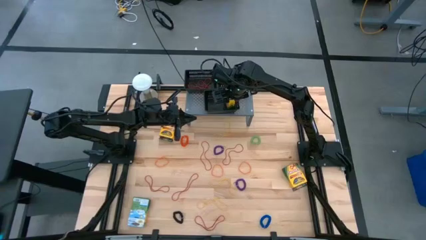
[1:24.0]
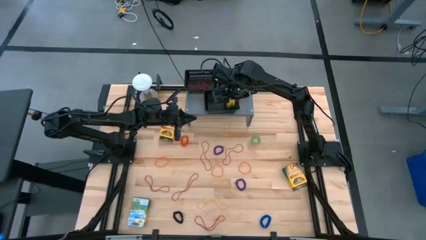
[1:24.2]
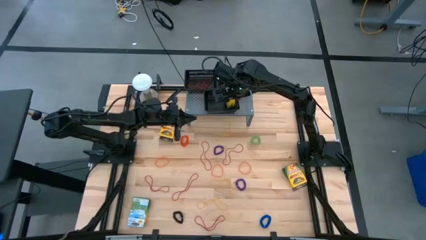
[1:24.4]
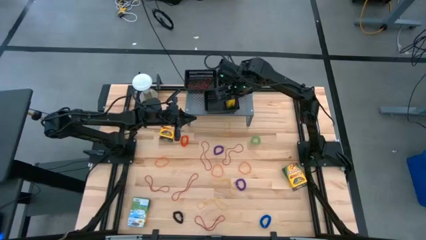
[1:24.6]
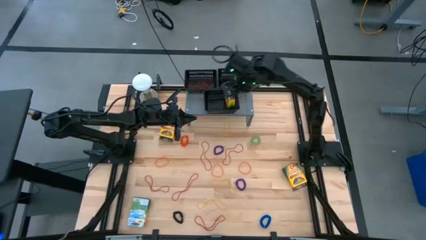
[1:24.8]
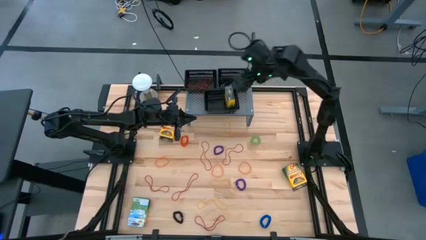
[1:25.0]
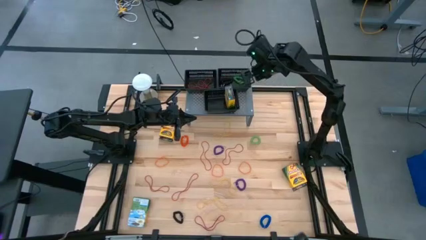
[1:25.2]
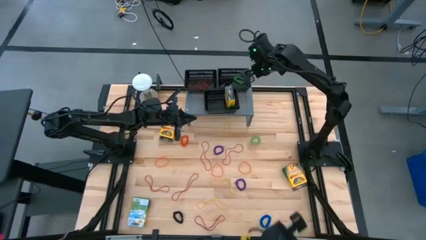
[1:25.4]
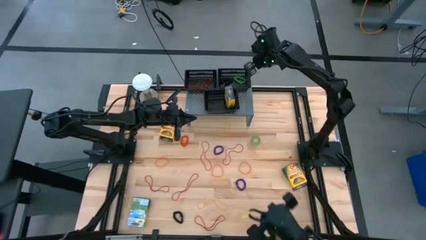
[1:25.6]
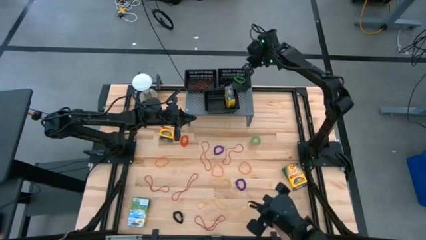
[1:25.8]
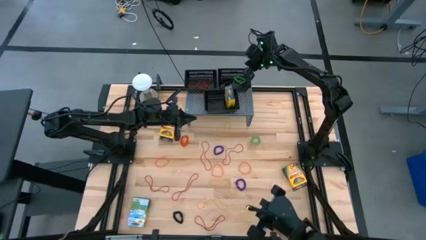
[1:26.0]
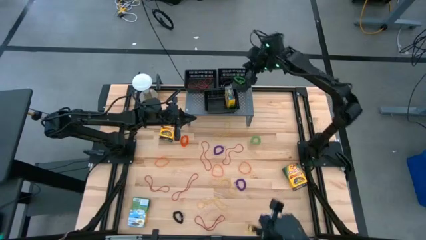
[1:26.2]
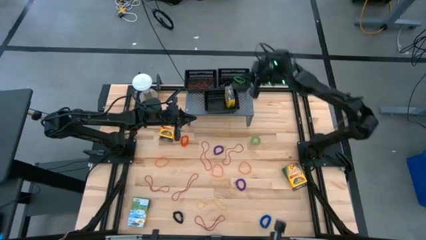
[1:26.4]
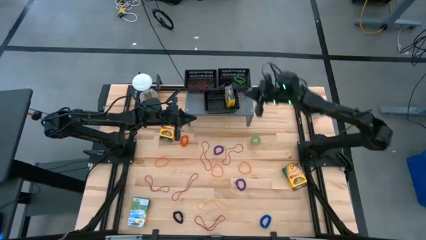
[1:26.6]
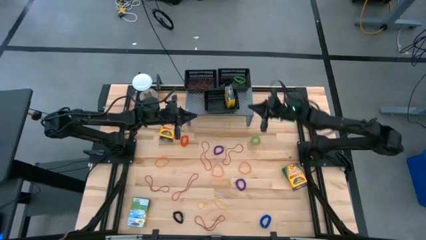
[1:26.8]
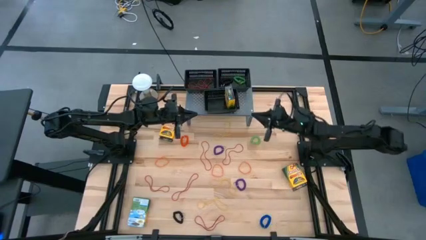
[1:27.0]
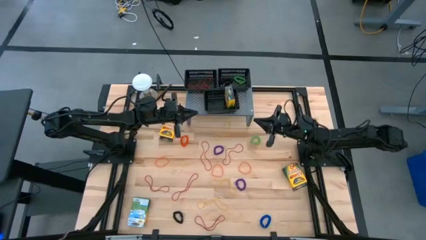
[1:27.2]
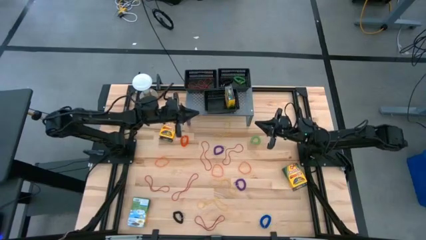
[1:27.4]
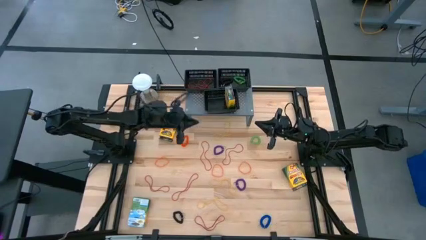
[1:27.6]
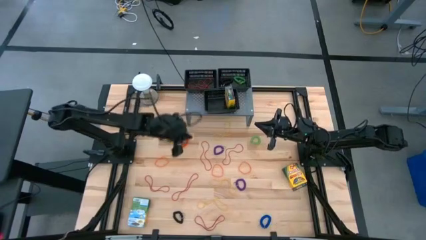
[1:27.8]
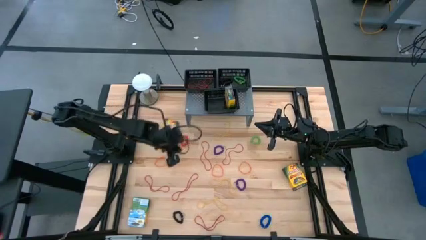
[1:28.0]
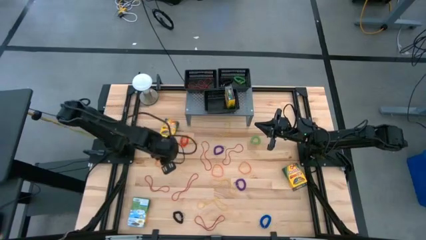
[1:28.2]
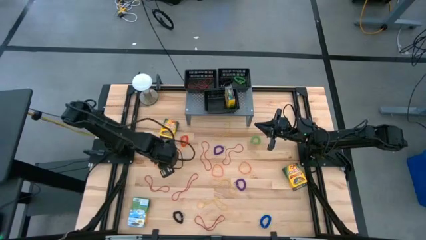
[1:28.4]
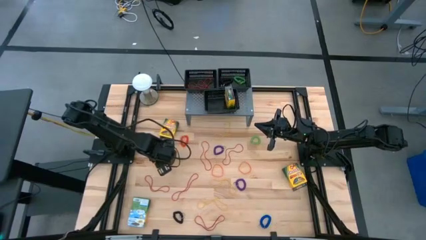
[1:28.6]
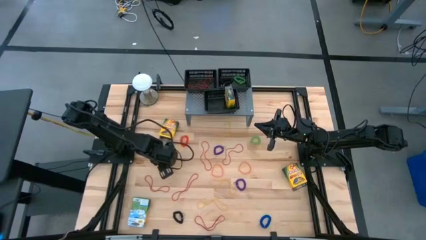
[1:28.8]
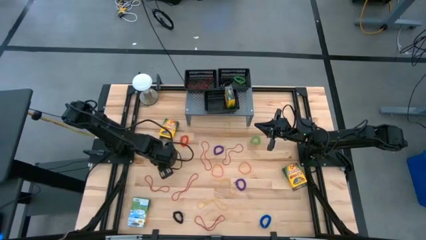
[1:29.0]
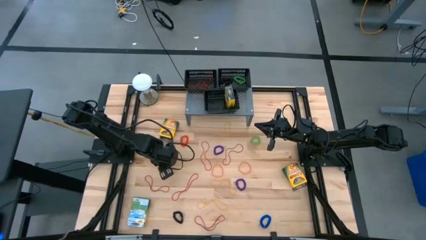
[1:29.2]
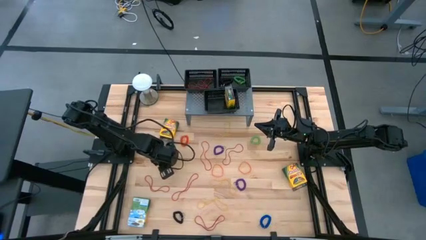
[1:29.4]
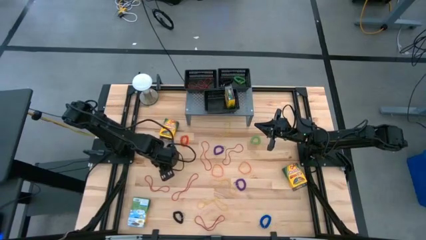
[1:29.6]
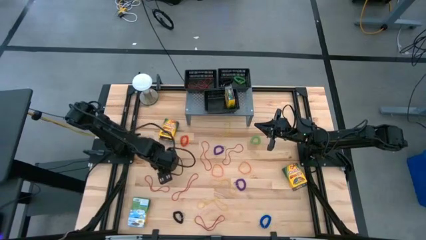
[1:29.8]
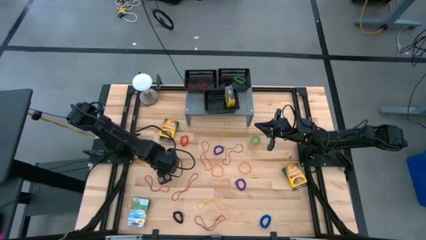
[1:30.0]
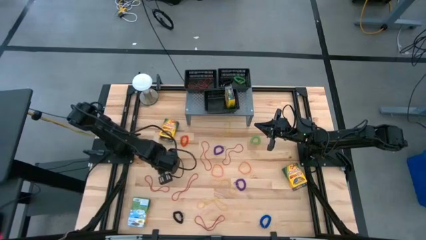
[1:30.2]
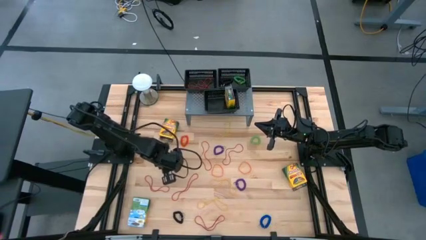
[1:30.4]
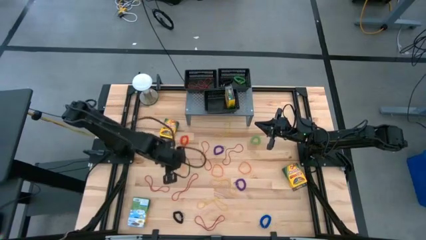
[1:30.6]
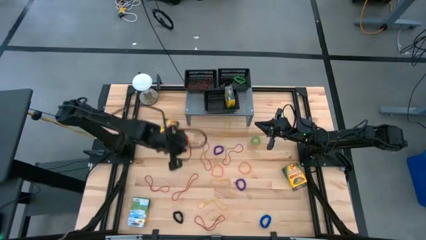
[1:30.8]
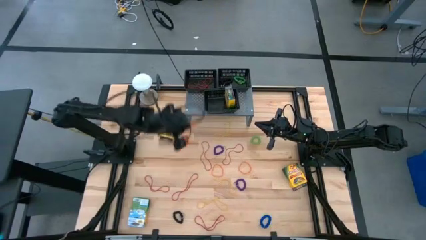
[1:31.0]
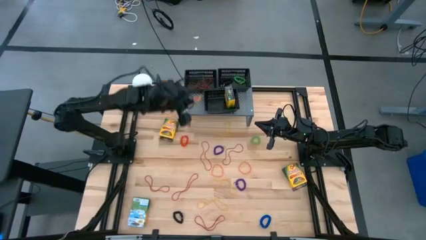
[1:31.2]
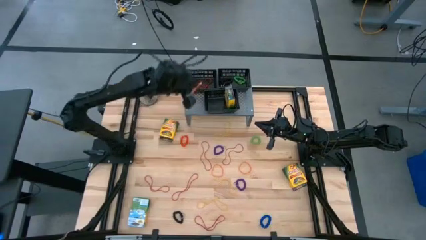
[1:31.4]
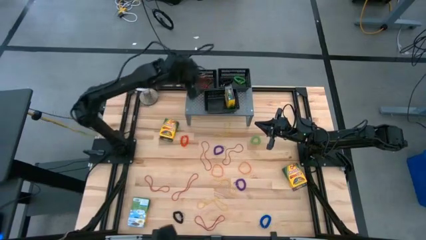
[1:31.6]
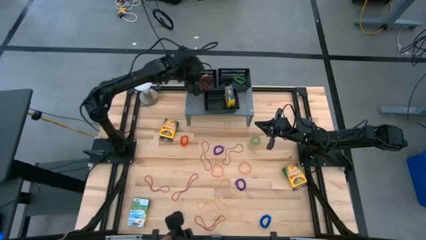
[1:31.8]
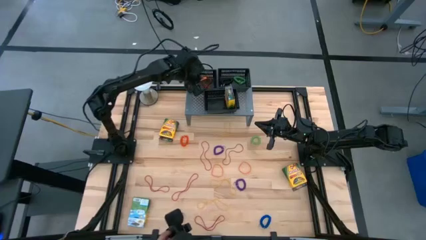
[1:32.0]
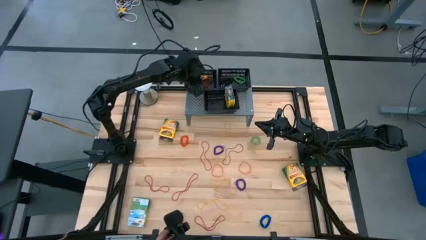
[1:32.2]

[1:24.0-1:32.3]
Task: Pick & Place Office Desk Supplies
Put the orange rubber band into the top left black basket on the shelf

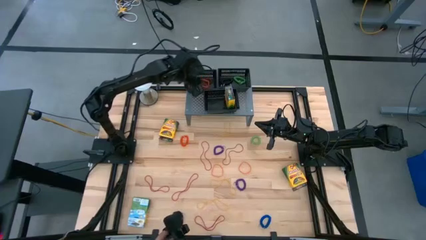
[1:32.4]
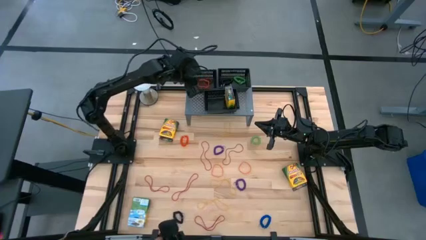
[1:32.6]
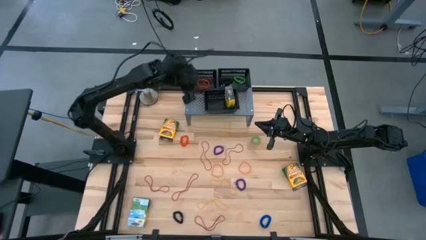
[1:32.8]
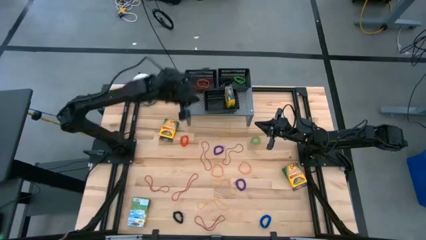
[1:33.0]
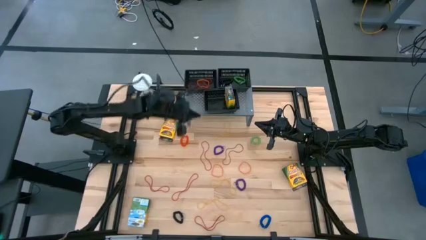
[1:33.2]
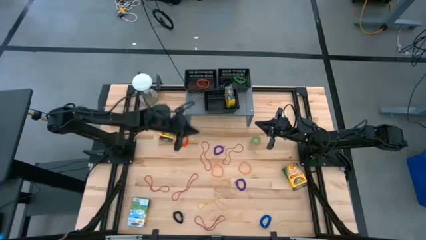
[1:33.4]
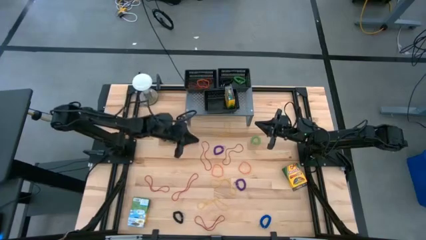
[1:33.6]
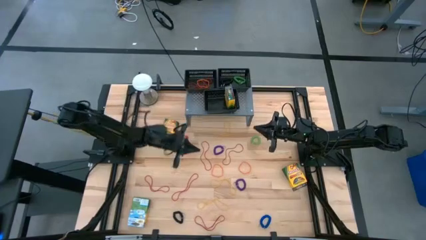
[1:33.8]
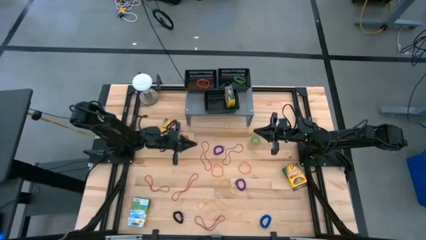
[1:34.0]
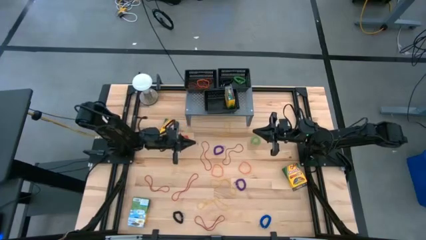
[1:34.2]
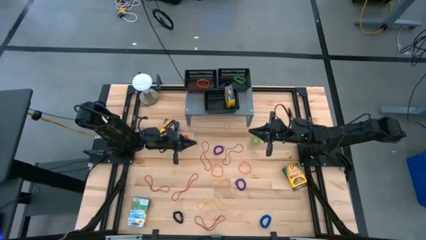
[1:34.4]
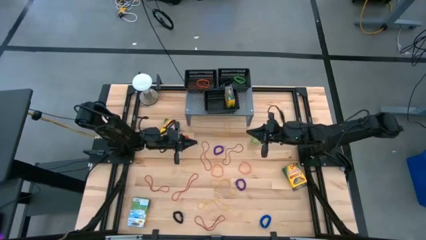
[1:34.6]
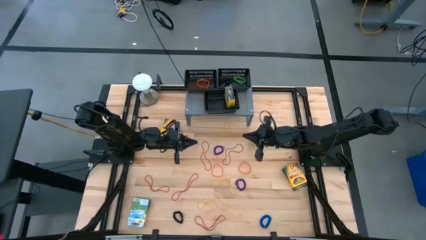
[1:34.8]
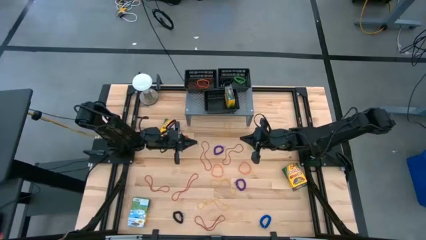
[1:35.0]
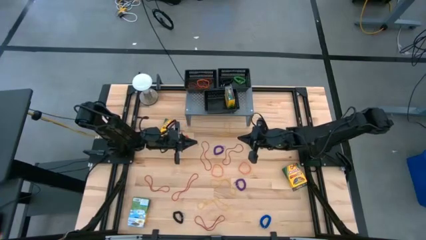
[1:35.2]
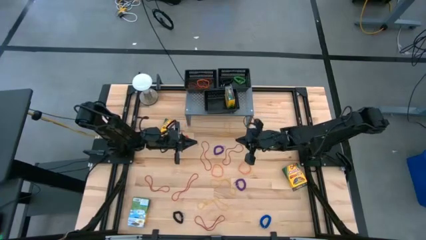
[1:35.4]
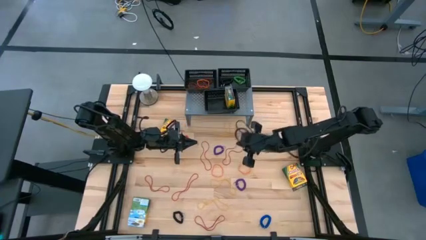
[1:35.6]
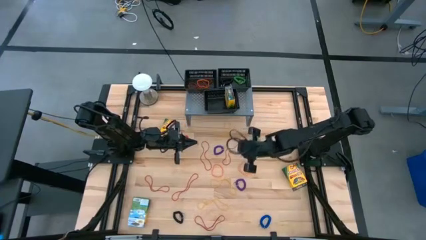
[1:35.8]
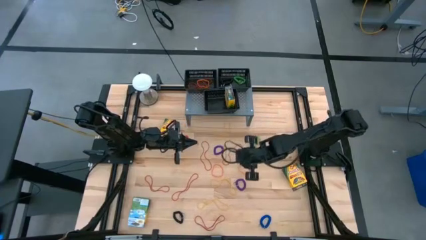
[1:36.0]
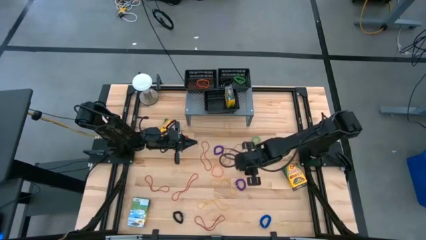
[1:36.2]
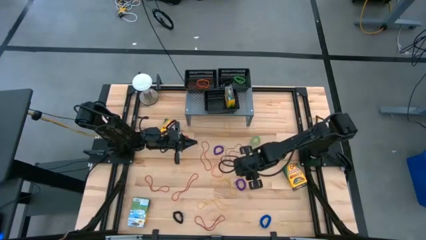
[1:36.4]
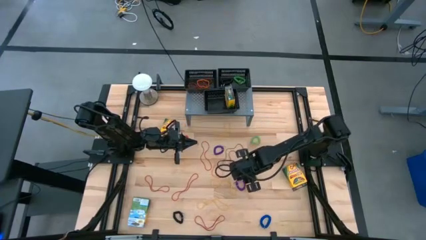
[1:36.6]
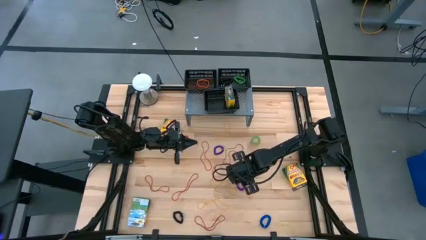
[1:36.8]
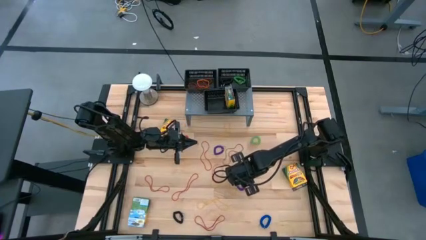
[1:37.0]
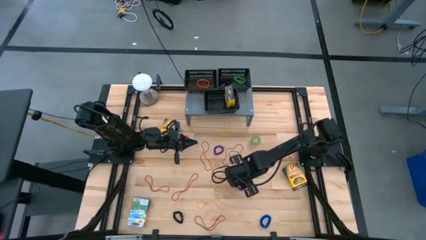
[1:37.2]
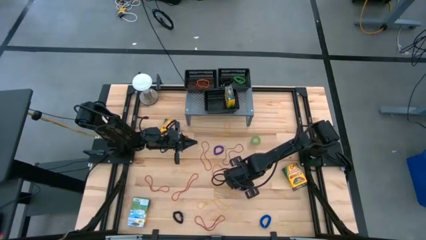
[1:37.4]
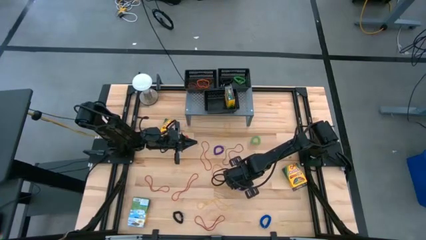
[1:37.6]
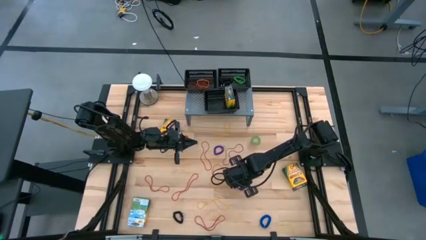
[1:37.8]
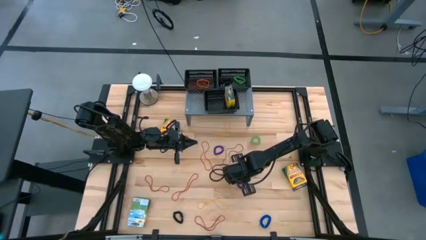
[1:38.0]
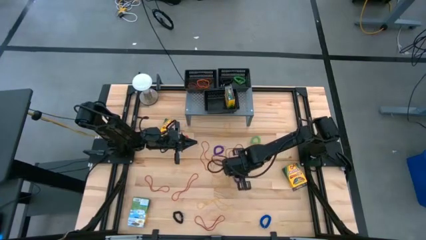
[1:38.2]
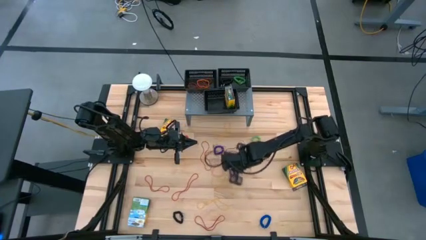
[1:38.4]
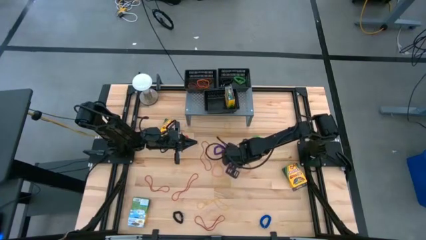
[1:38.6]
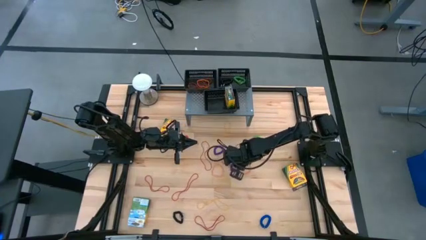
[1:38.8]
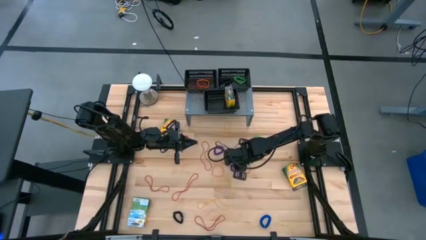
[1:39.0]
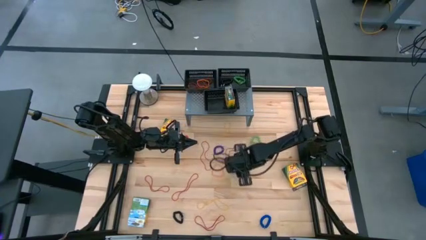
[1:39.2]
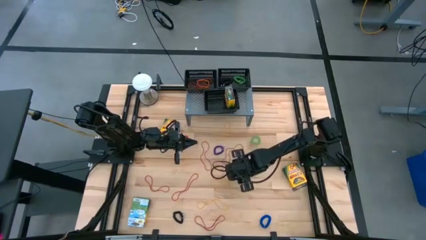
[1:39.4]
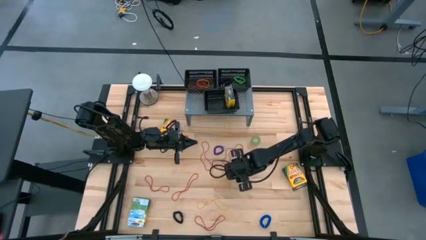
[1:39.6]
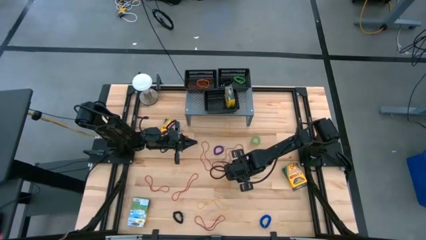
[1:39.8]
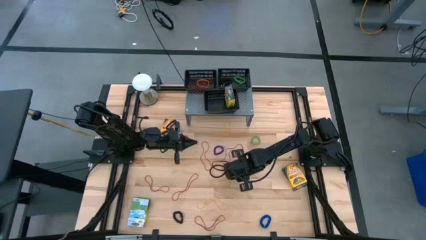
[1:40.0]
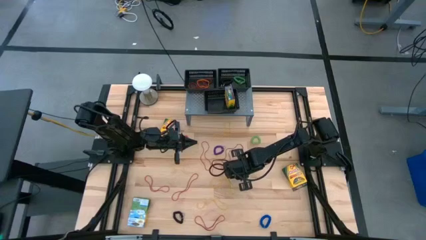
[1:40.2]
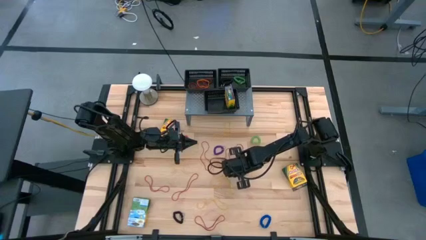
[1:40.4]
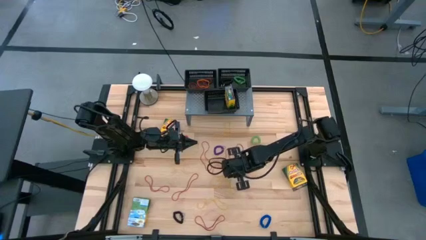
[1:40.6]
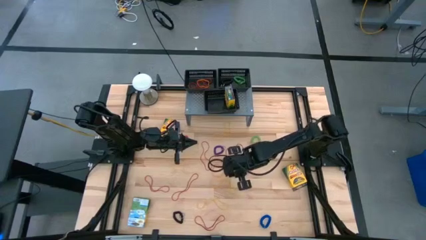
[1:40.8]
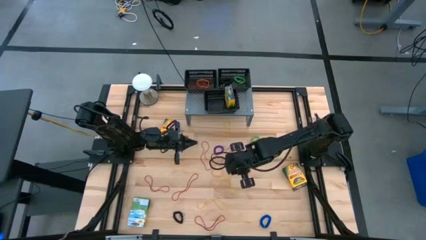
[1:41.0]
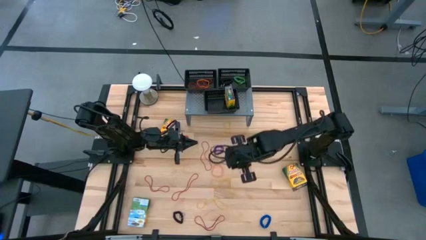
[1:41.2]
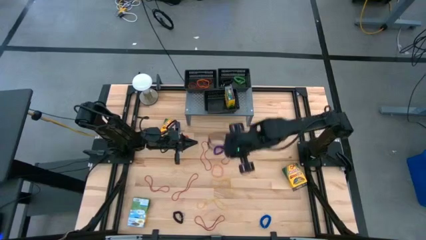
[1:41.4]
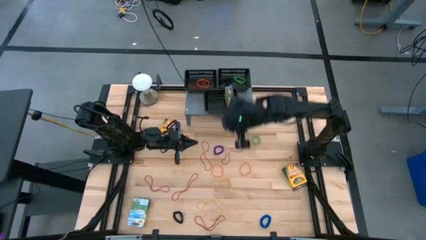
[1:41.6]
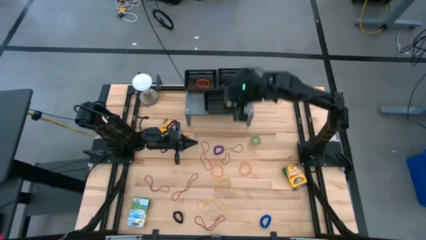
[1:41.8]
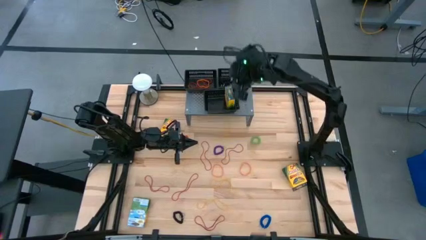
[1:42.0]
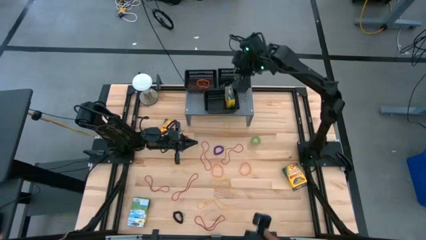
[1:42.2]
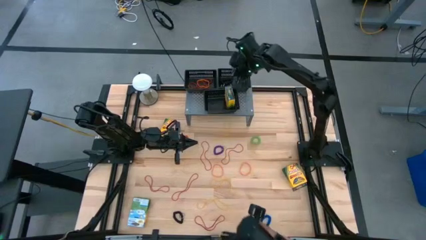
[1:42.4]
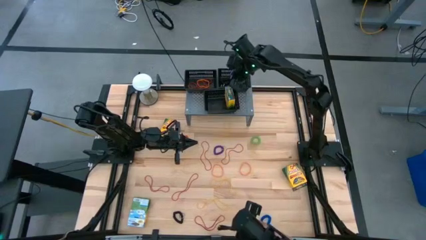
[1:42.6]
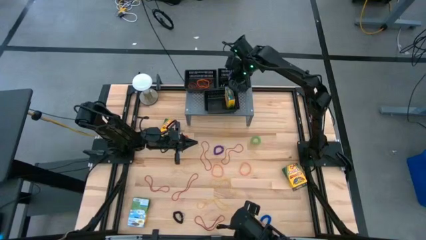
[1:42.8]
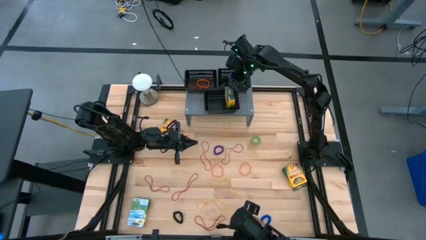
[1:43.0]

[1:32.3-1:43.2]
Put the purple spring keychain into the top right black basket on the shelf
